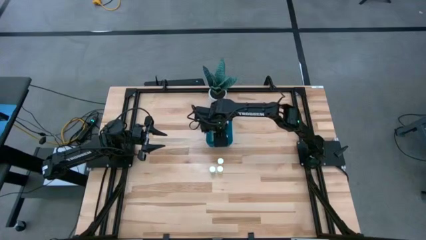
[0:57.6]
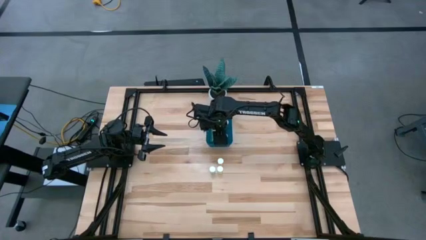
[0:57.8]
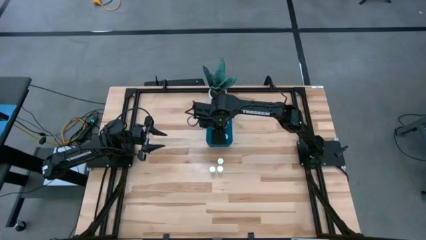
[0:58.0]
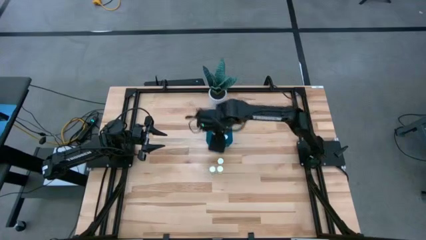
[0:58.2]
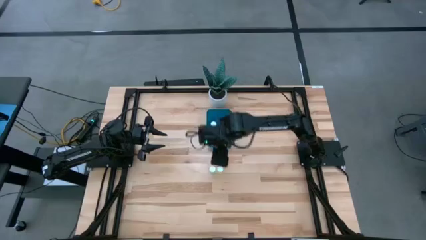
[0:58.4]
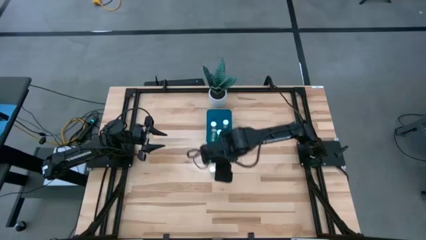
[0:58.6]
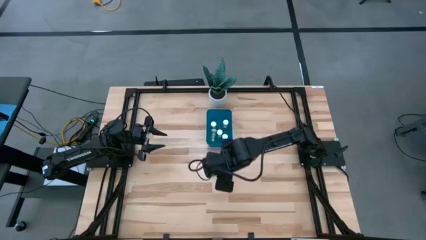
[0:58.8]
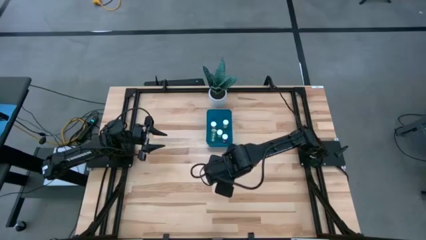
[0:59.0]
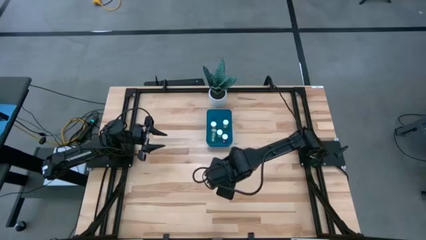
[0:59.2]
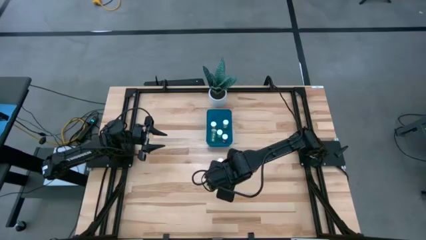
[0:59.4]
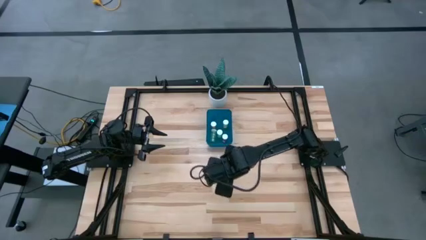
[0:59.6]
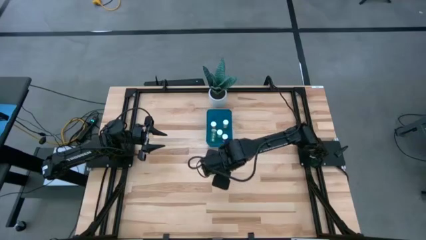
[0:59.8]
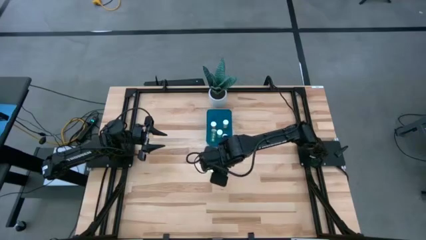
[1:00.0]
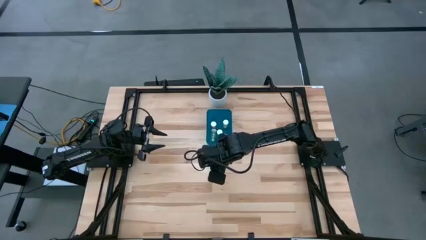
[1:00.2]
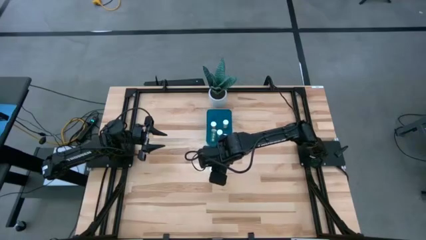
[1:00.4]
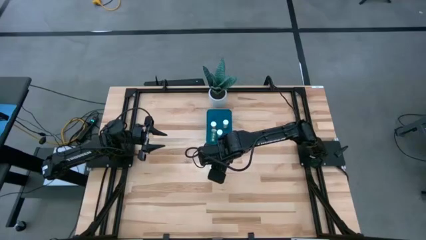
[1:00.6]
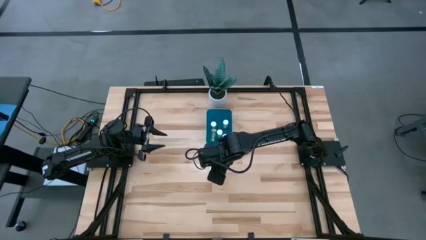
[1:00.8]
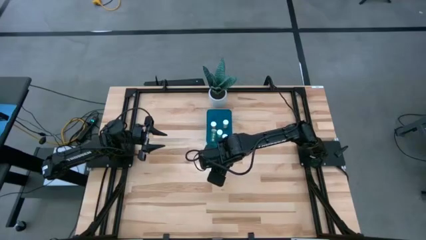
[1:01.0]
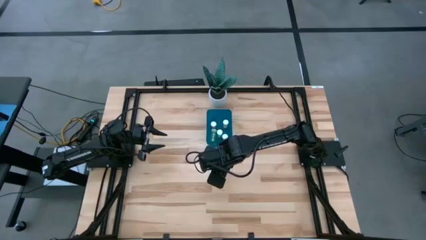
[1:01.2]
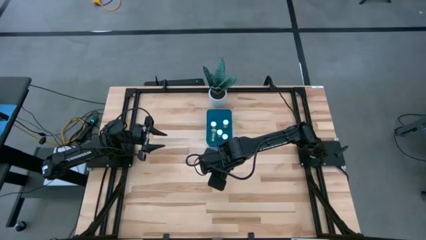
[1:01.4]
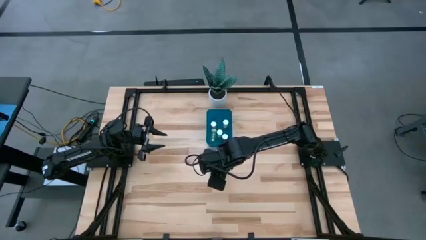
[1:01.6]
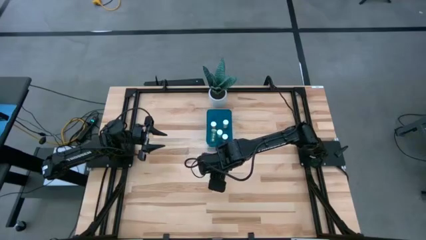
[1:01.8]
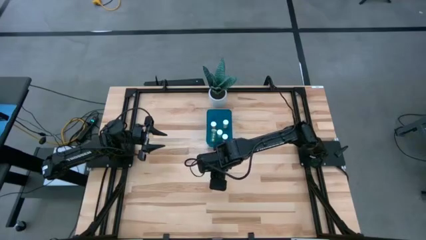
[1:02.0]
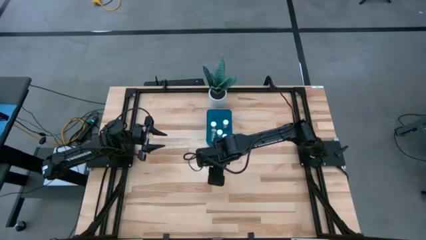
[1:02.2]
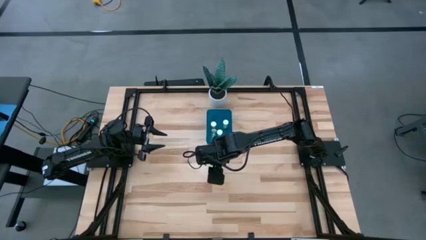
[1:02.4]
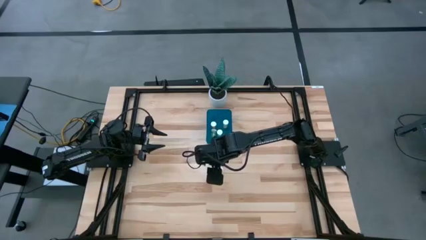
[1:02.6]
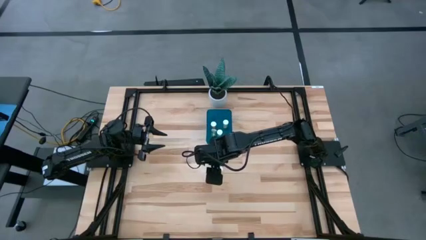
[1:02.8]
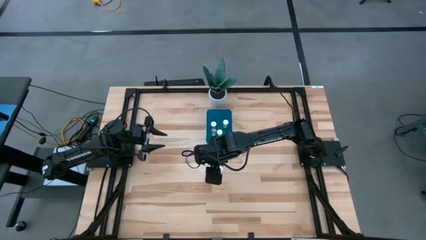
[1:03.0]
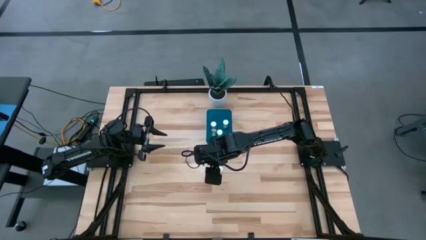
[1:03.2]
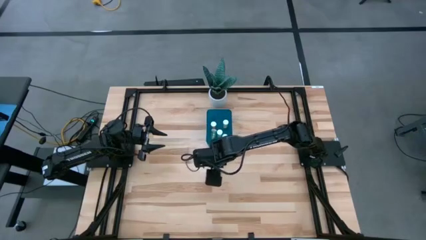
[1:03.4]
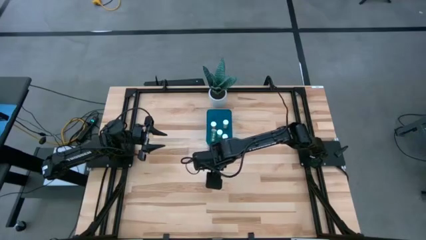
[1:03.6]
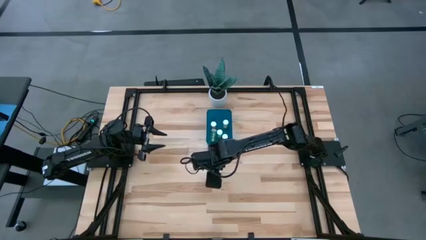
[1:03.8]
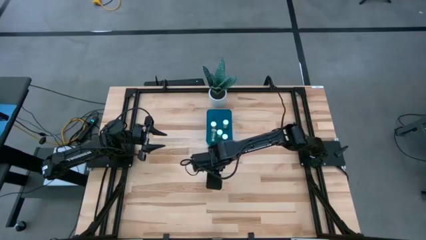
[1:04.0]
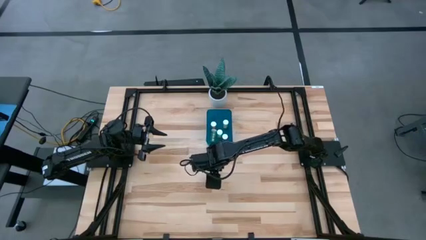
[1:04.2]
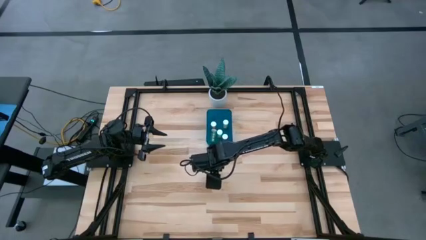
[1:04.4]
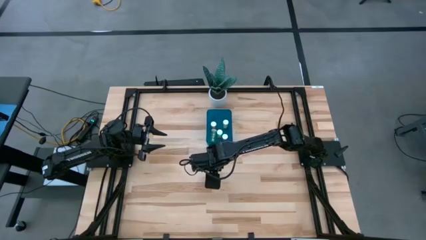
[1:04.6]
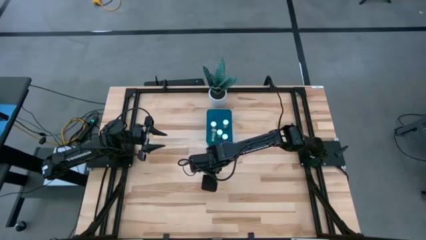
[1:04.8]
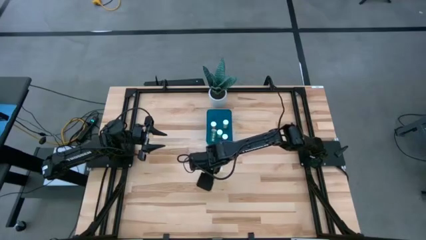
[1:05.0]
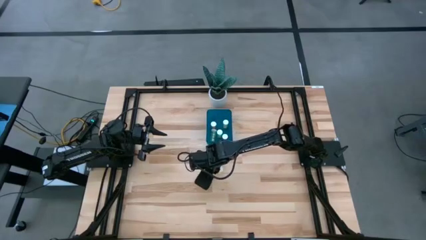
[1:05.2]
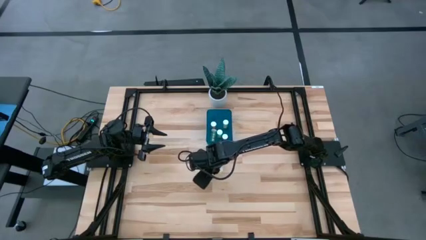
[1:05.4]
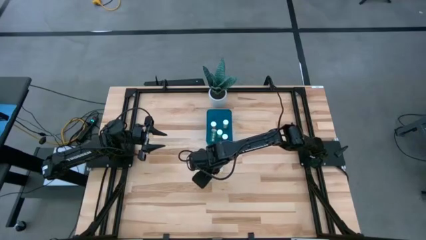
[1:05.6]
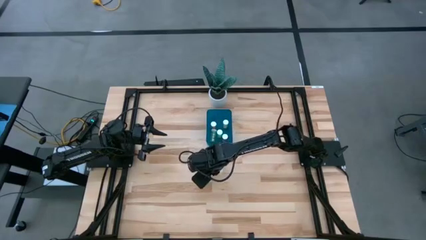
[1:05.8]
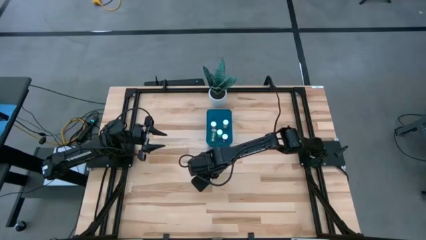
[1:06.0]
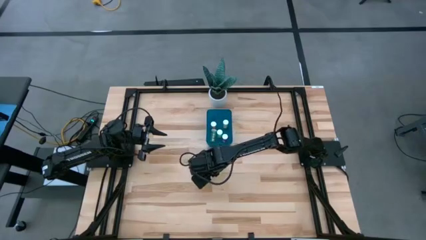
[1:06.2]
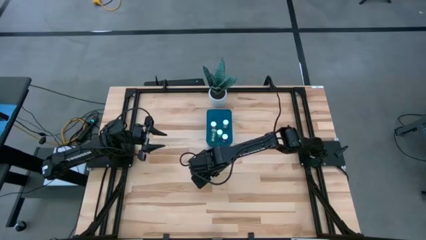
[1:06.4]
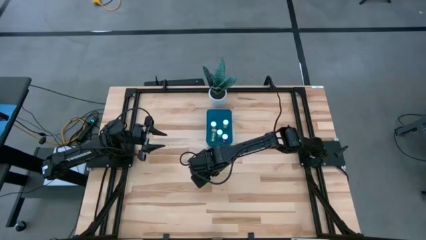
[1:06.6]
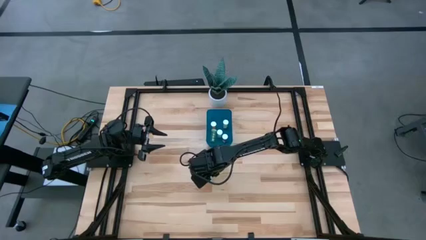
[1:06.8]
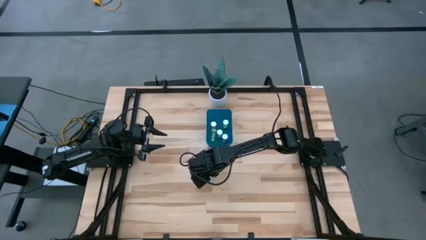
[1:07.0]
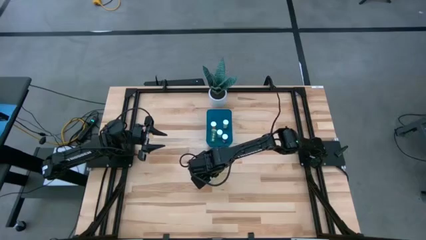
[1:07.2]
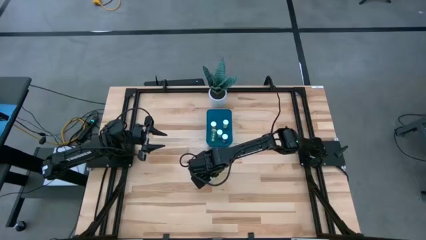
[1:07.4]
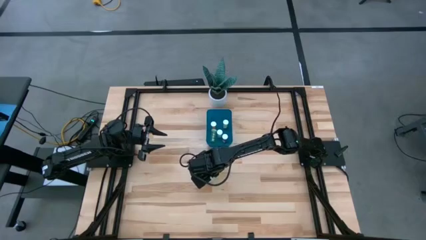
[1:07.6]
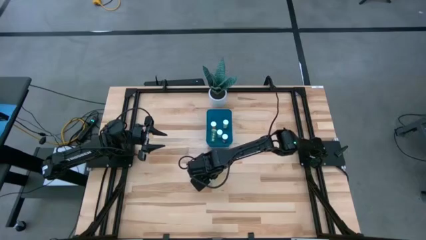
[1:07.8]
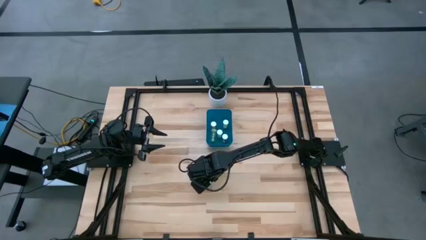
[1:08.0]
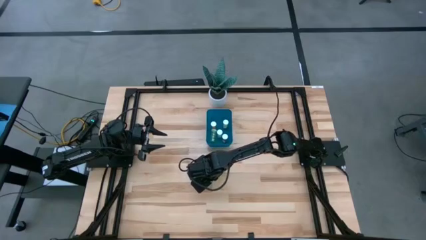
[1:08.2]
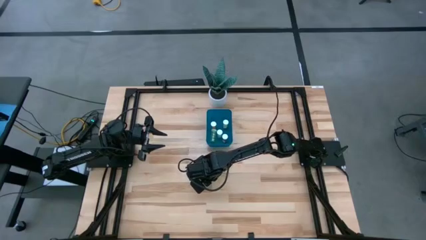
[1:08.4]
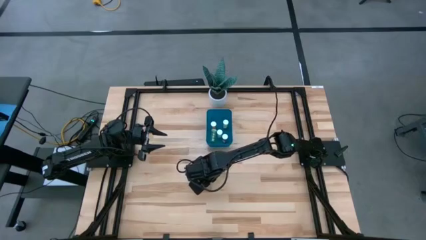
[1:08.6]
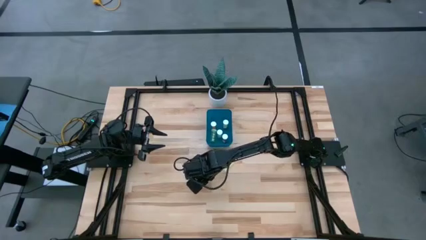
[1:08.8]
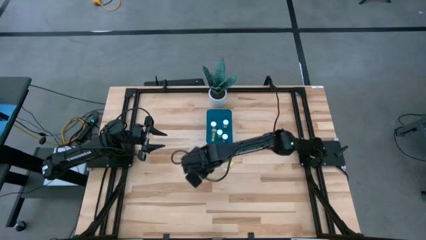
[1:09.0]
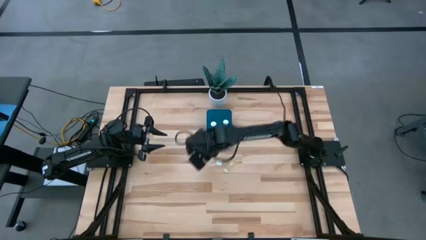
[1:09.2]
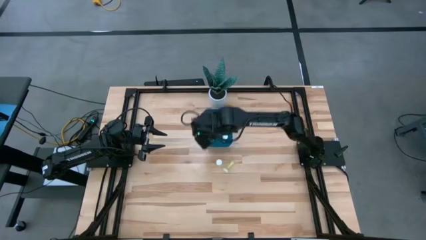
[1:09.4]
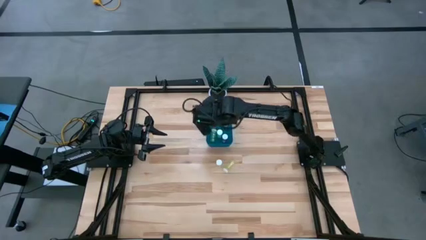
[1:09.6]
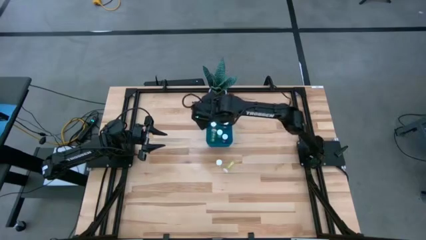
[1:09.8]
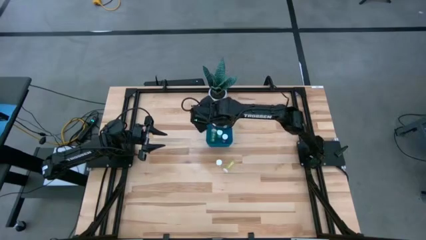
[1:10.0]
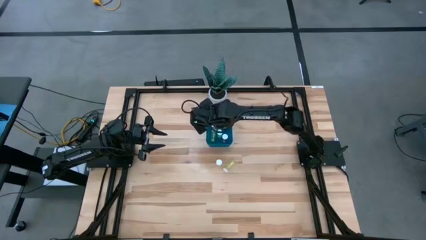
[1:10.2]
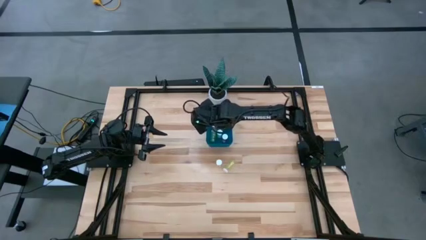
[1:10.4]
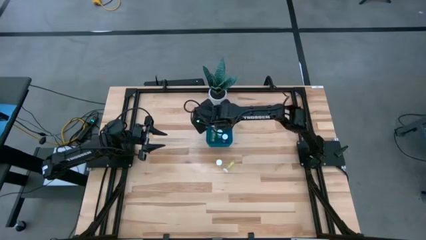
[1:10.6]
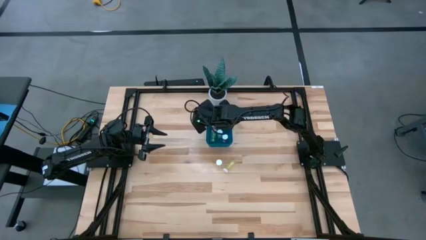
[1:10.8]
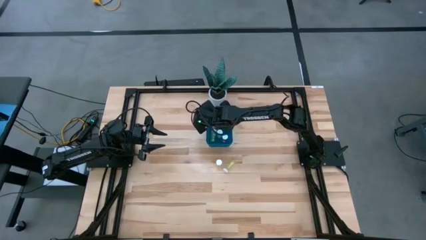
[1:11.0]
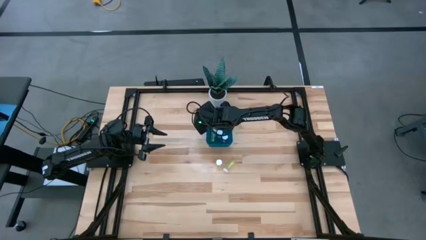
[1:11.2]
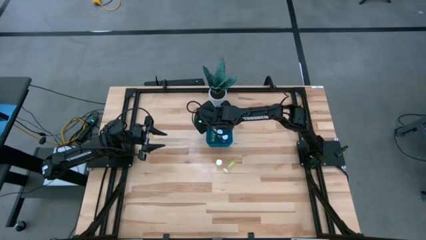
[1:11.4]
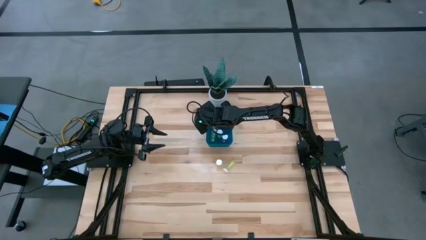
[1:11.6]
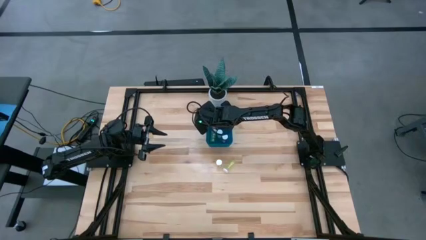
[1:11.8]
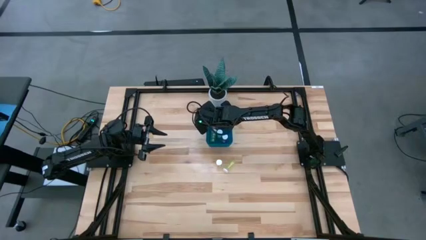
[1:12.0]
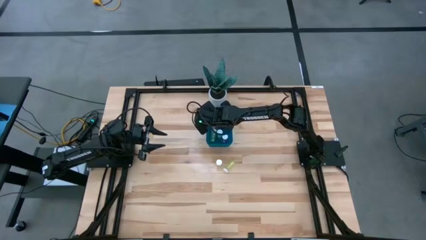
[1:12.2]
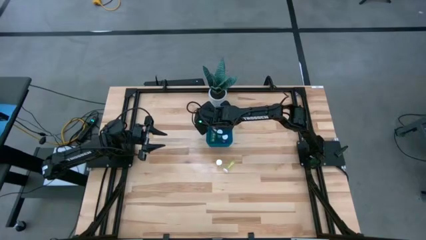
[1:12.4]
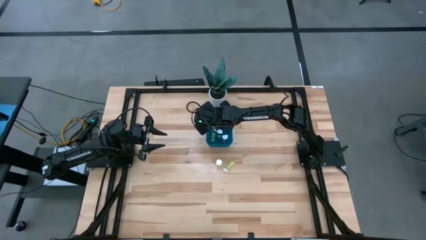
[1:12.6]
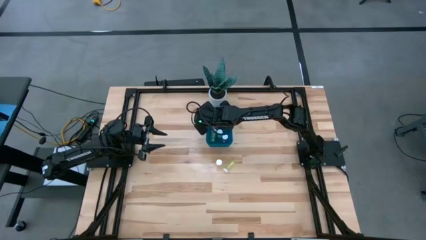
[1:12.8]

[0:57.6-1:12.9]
Task: Pick and place pill bottles into a basket
Put the blue tablet bottle into the bin
